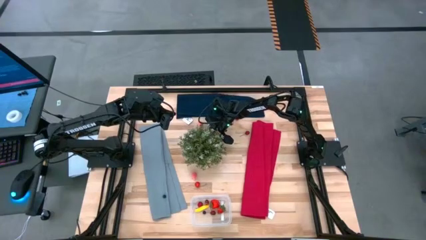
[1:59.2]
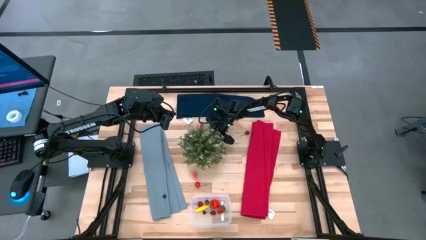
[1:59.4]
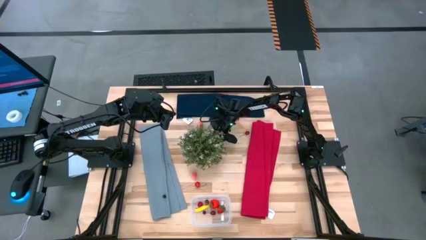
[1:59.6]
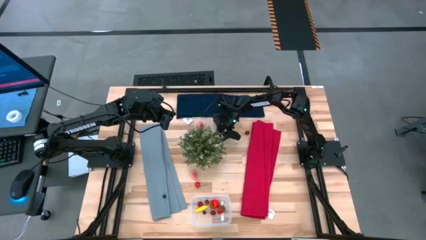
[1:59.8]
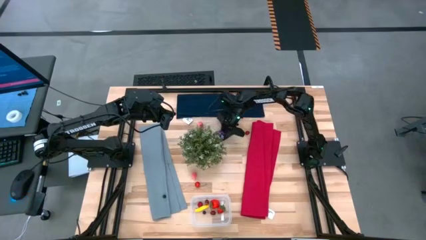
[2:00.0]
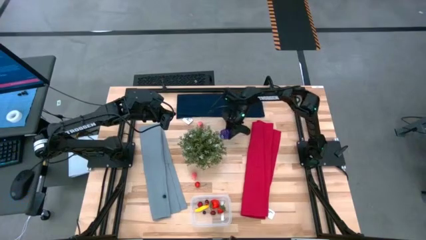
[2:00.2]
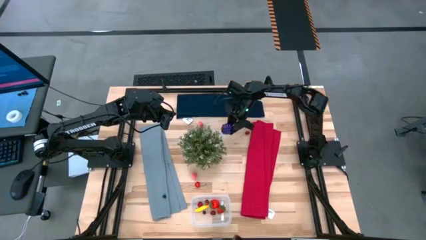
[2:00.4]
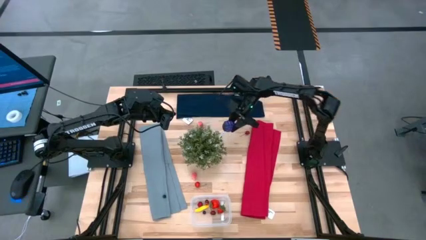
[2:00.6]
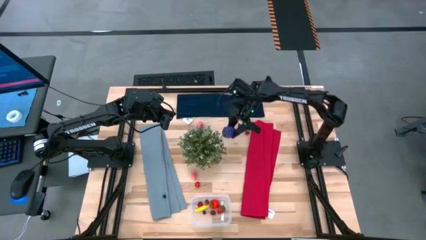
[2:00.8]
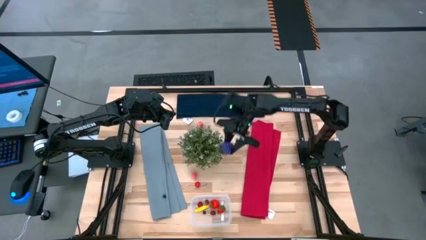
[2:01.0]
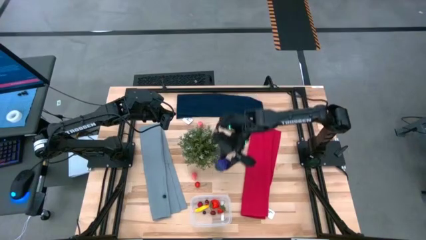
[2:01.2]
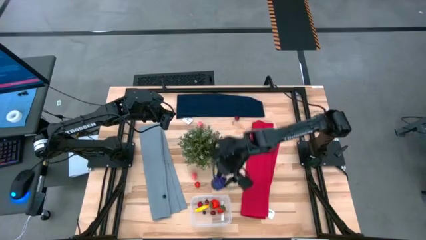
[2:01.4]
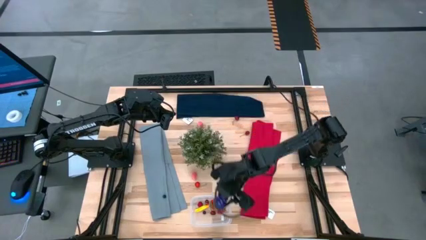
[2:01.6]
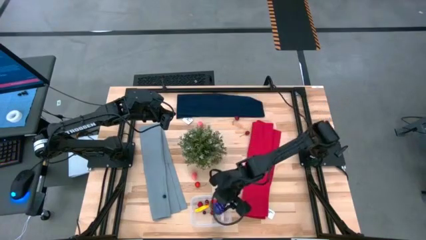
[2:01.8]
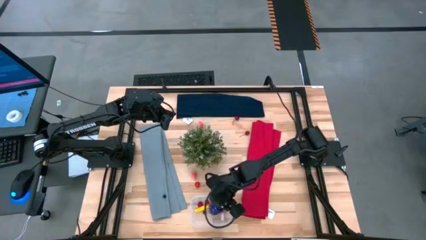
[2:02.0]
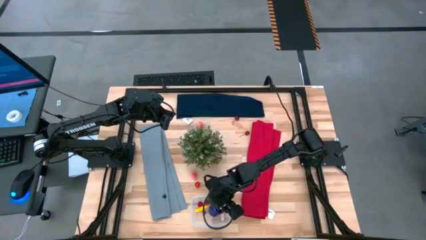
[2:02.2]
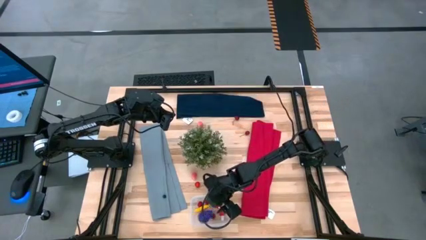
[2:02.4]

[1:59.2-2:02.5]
Task: Pick and placing Produce into tupperware
Put the grapes into the transparent container

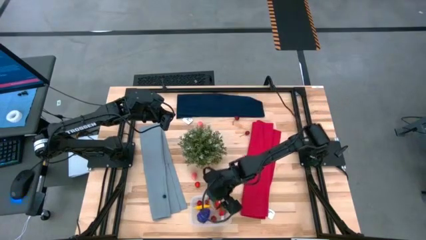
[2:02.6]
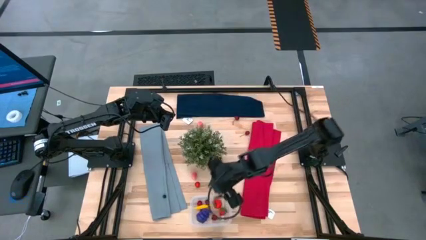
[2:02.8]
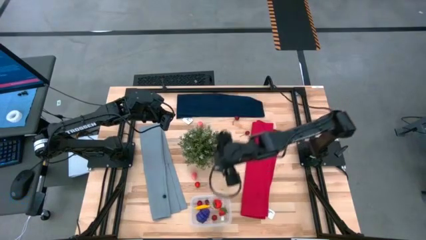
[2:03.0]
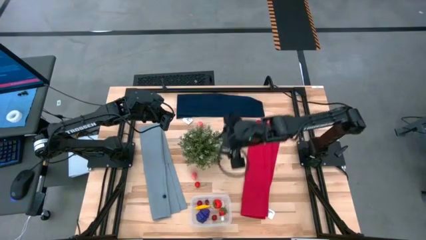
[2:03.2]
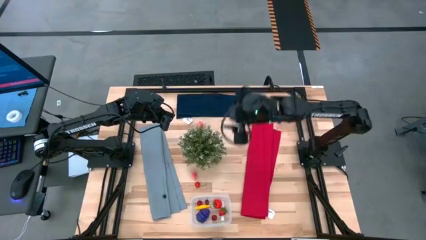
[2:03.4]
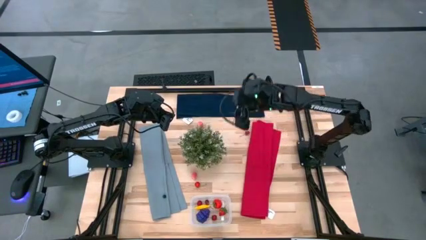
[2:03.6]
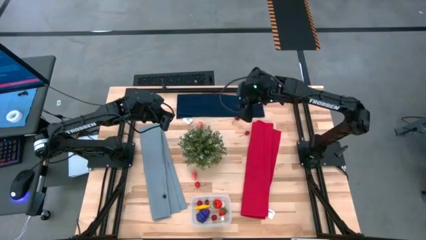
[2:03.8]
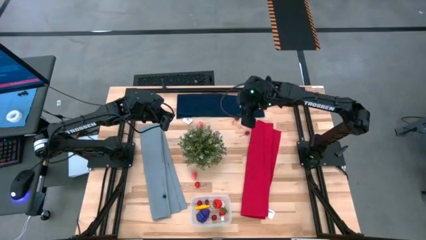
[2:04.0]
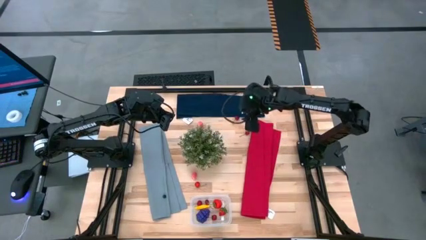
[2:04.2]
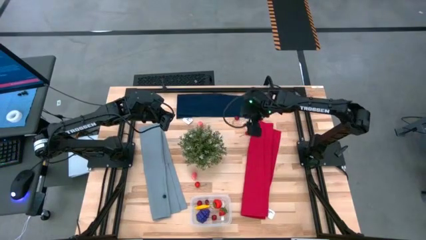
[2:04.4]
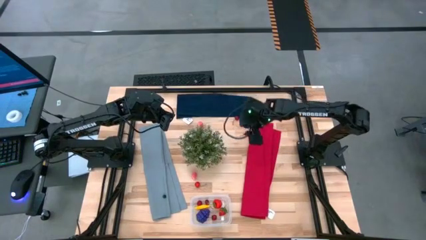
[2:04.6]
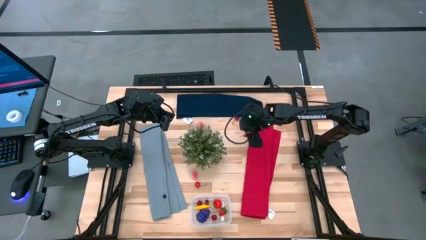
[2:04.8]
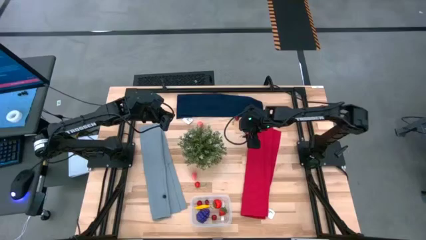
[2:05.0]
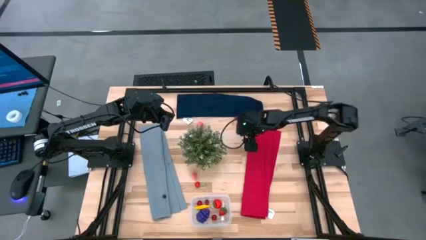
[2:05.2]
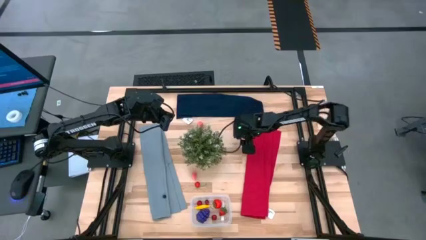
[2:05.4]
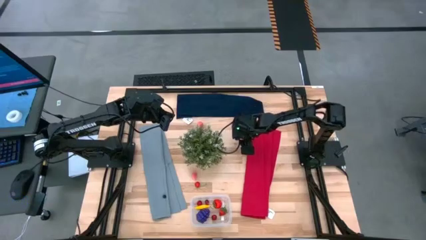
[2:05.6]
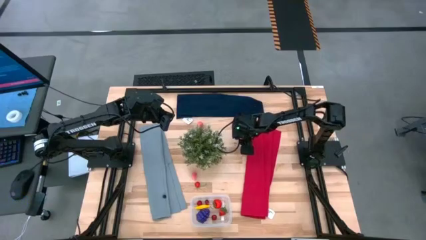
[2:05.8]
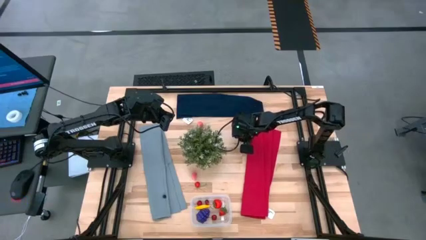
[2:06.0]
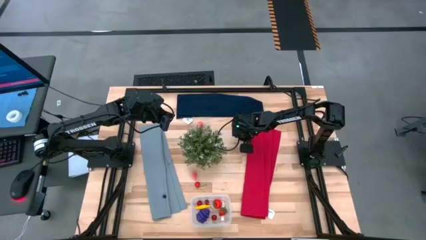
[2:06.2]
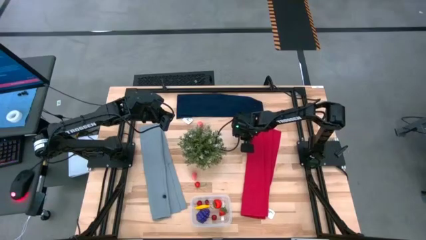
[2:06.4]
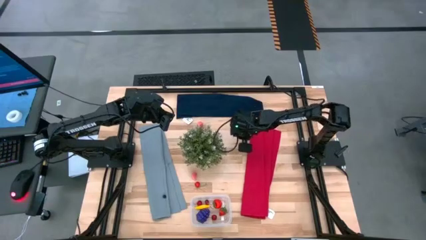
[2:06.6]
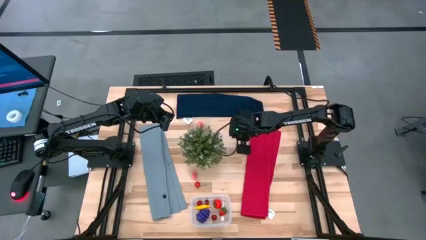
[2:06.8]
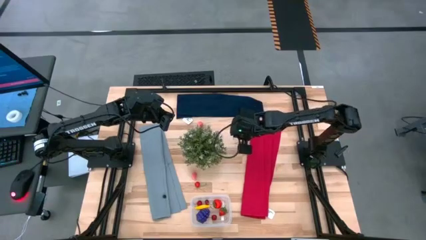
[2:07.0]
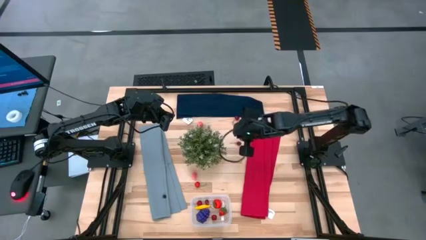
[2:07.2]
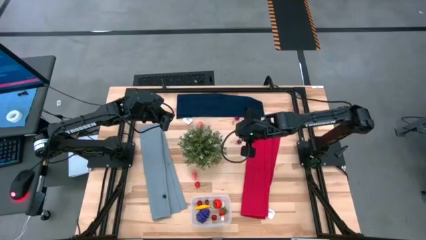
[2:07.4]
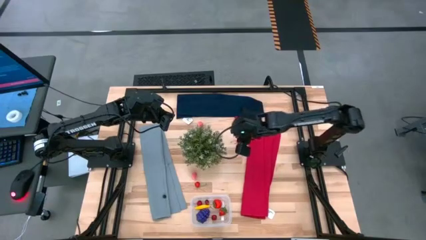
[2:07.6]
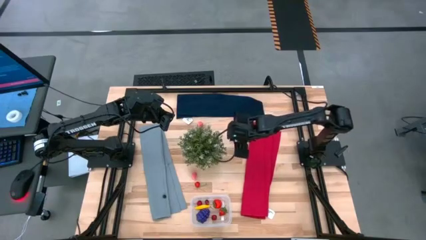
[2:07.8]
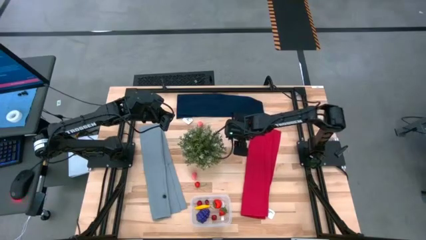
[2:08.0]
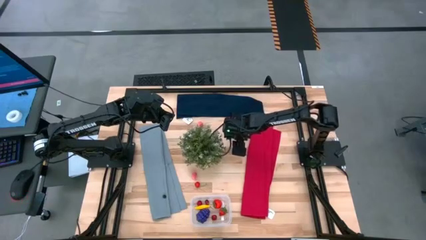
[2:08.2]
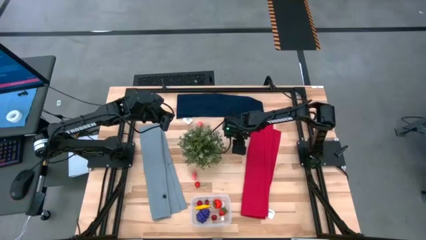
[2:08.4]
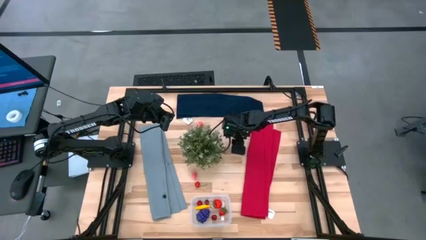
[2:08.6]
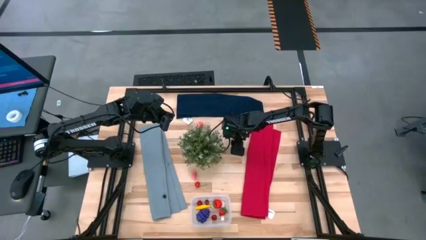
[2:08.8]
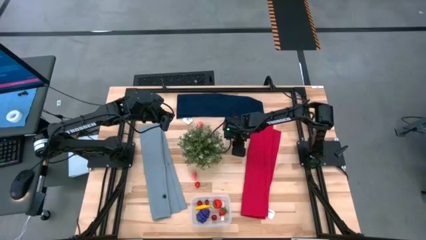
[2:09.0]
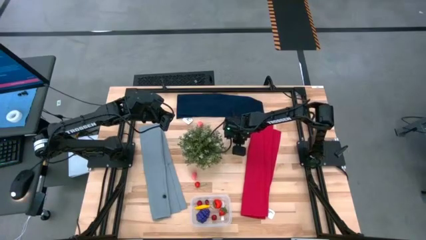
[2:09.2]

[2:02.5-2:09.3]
Put the right cherry into the transparent container

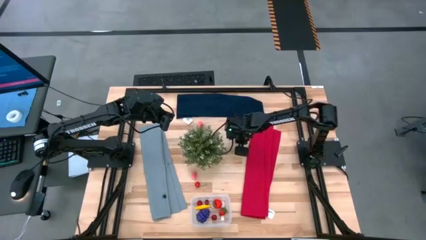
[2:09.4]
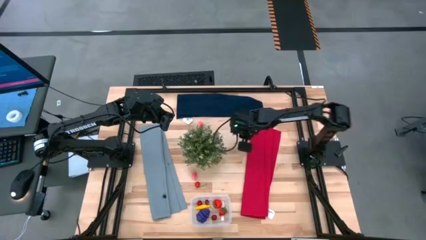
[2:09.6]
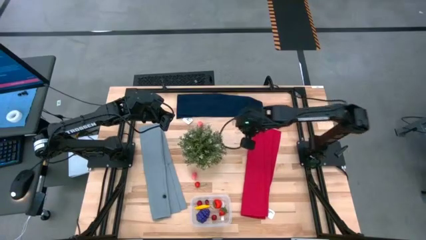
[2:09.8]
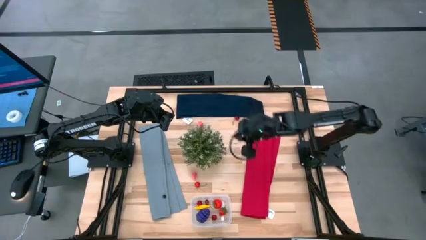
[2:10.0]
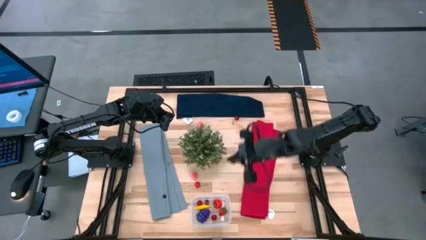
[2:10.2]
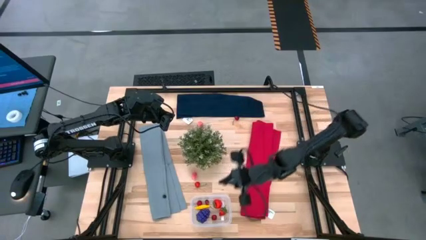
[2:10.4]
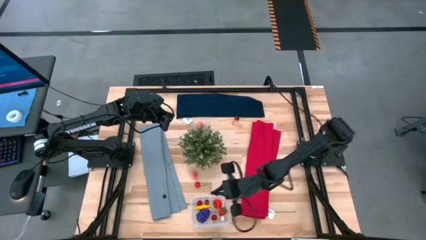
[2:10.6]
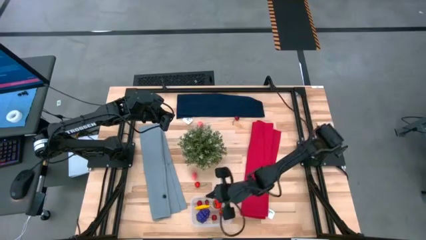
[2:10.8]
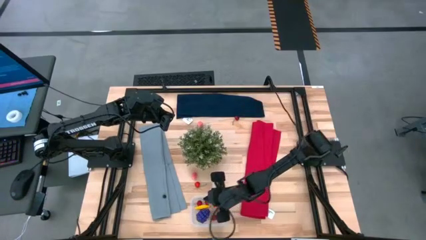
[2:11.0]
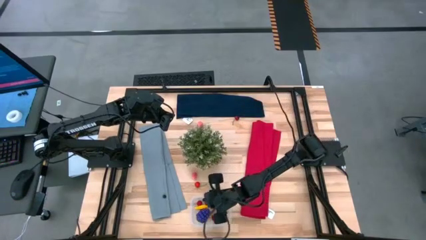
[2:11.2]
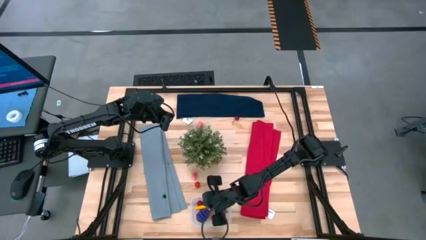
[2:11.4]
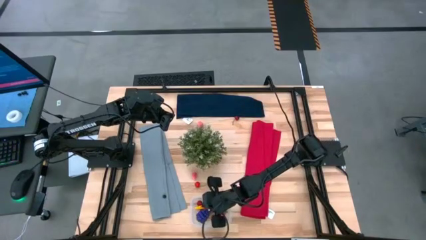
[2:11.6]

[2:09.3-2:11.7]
Put the right cherry into the transparent container
